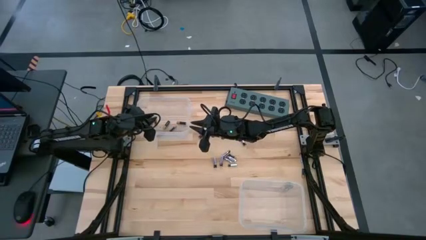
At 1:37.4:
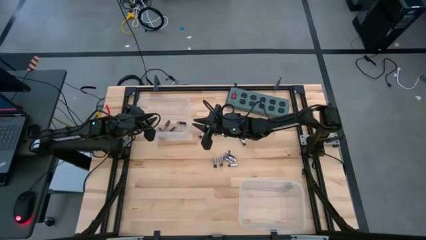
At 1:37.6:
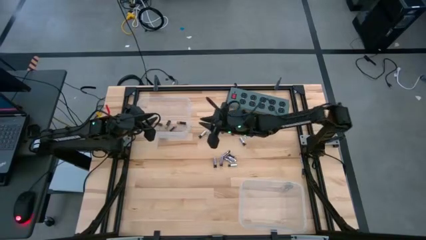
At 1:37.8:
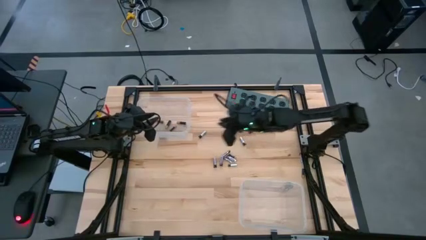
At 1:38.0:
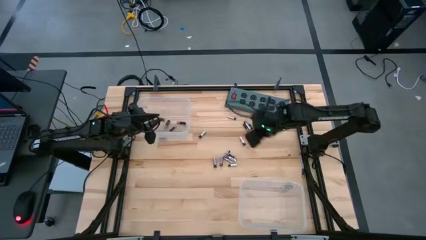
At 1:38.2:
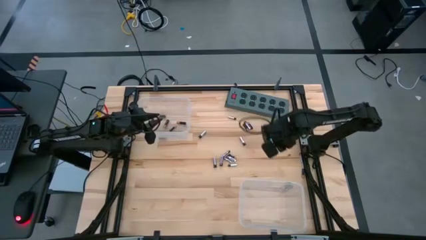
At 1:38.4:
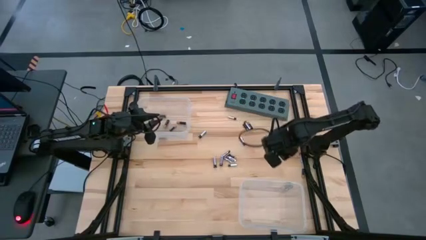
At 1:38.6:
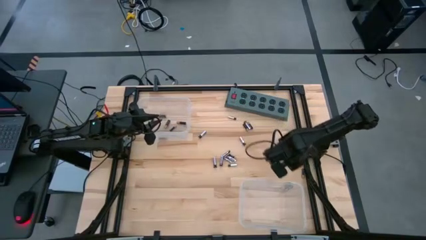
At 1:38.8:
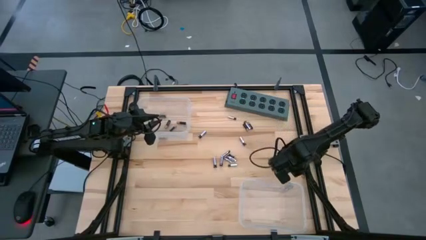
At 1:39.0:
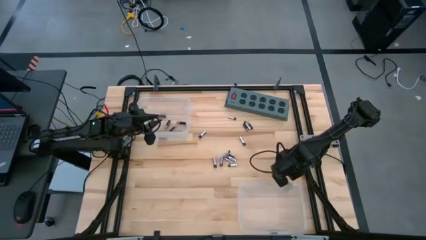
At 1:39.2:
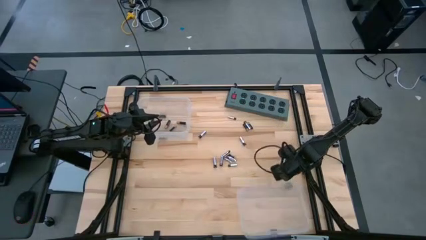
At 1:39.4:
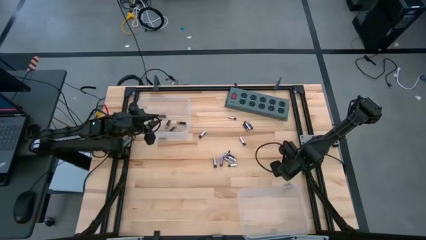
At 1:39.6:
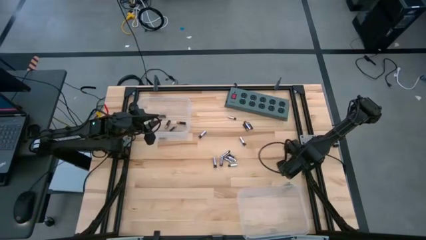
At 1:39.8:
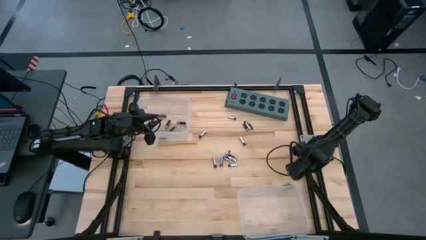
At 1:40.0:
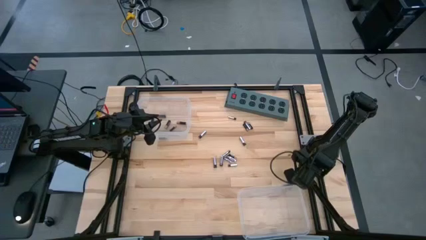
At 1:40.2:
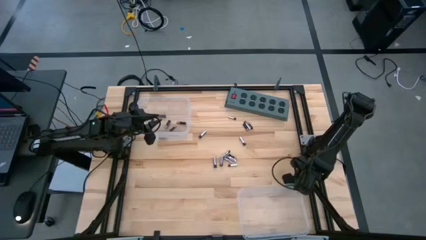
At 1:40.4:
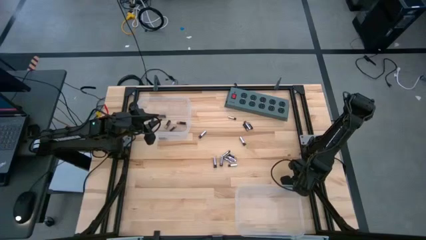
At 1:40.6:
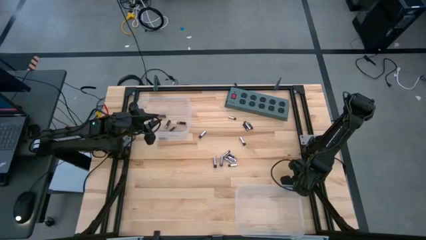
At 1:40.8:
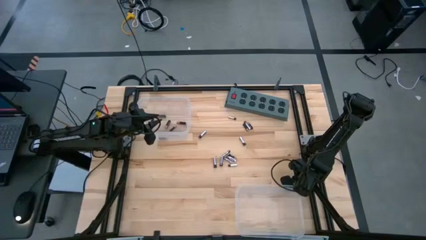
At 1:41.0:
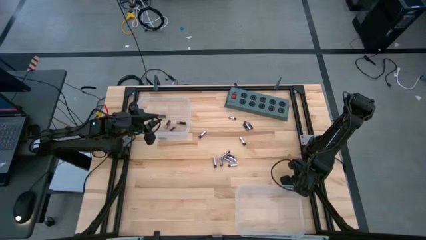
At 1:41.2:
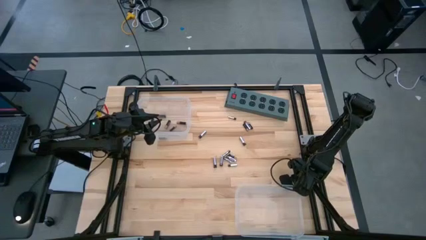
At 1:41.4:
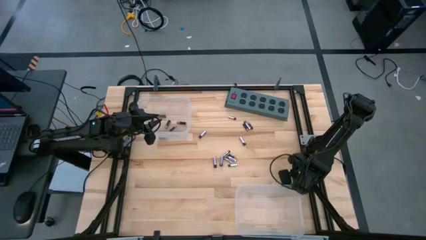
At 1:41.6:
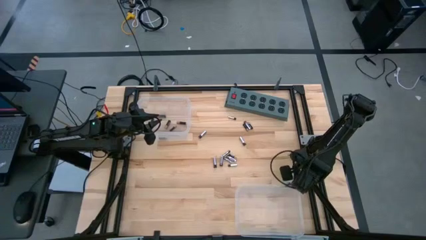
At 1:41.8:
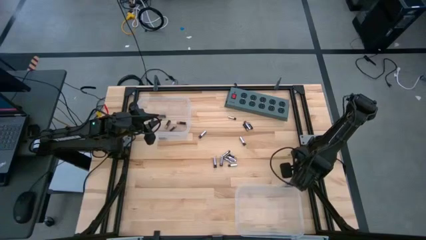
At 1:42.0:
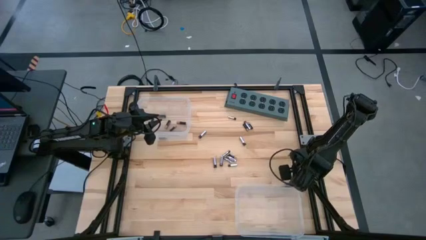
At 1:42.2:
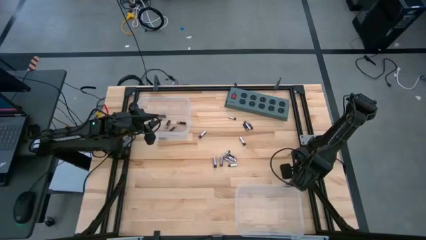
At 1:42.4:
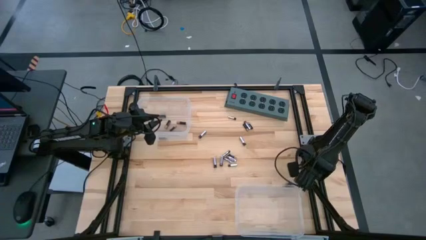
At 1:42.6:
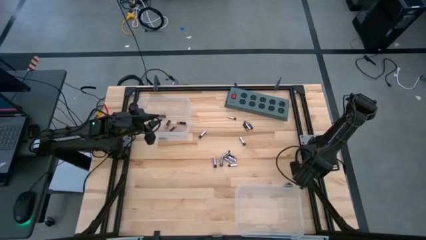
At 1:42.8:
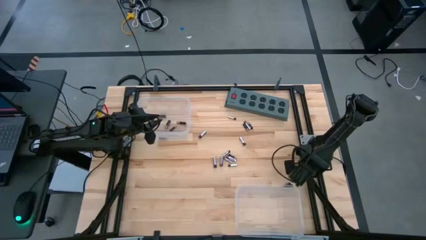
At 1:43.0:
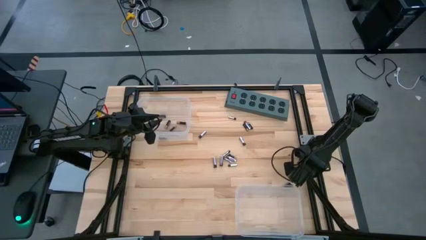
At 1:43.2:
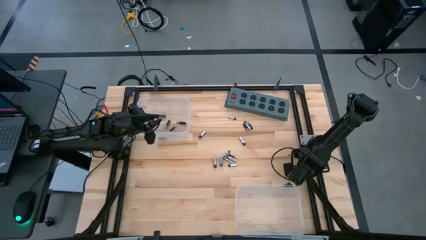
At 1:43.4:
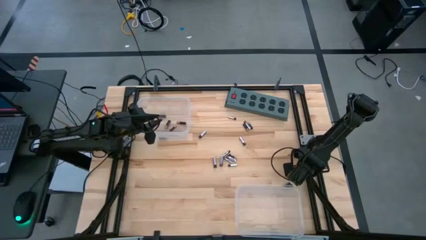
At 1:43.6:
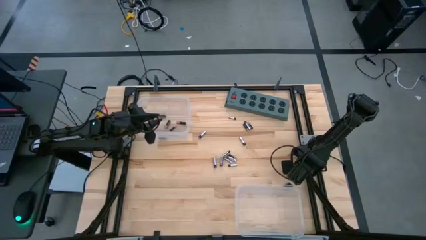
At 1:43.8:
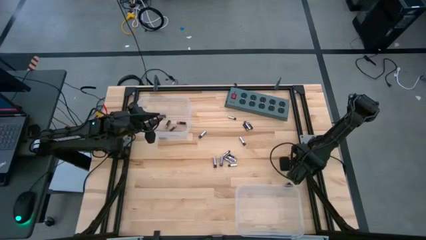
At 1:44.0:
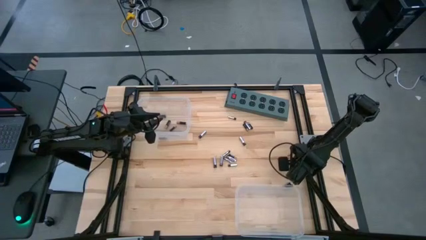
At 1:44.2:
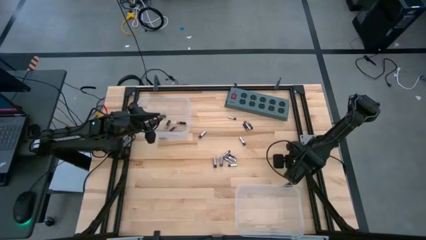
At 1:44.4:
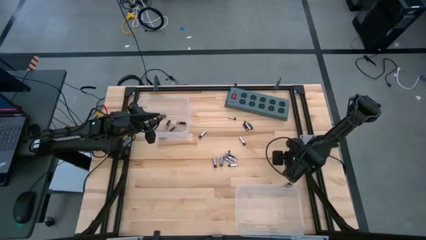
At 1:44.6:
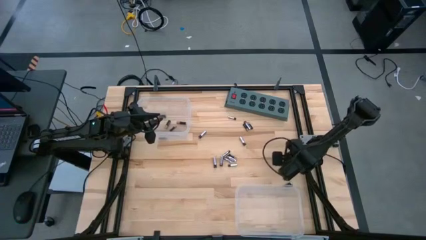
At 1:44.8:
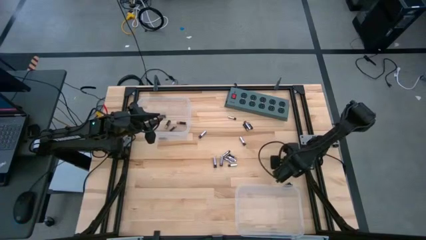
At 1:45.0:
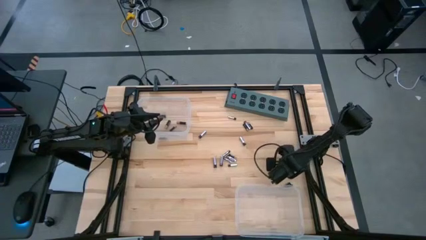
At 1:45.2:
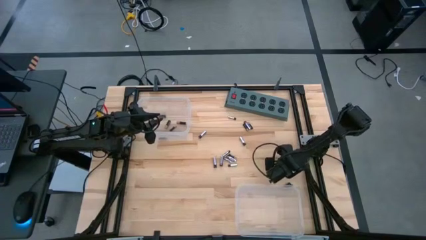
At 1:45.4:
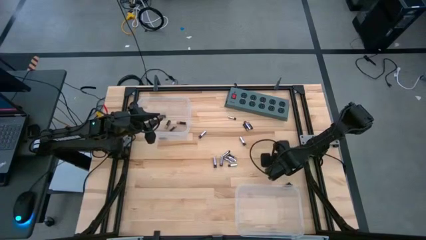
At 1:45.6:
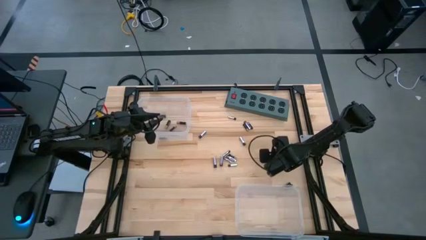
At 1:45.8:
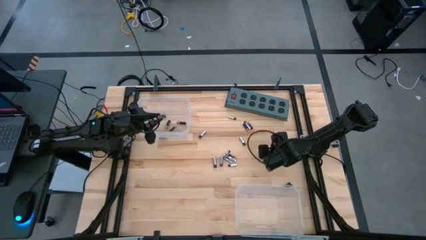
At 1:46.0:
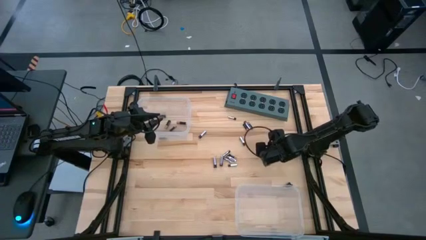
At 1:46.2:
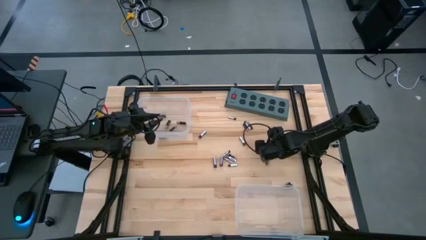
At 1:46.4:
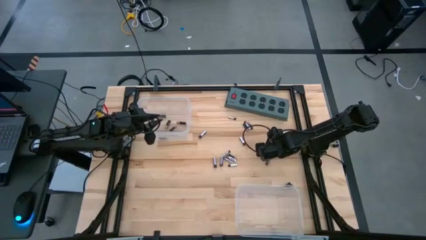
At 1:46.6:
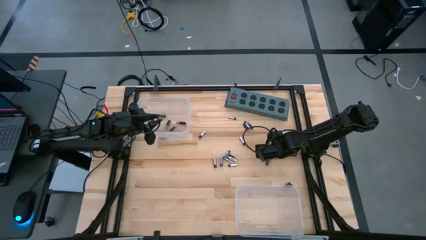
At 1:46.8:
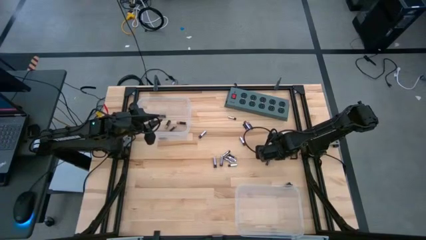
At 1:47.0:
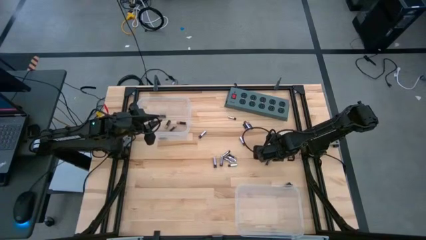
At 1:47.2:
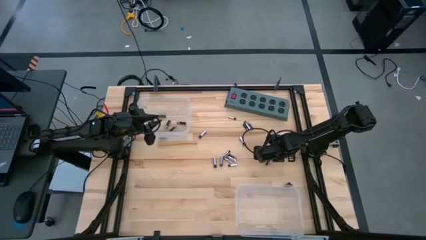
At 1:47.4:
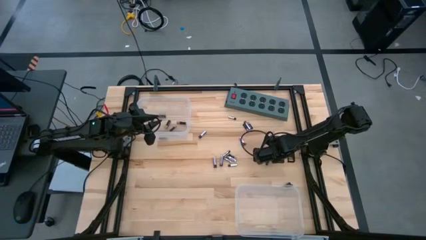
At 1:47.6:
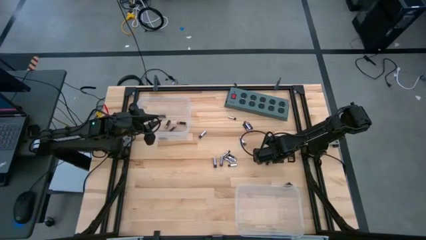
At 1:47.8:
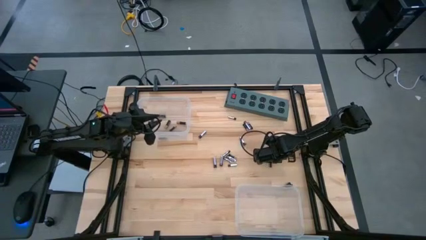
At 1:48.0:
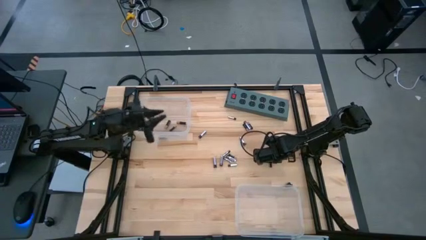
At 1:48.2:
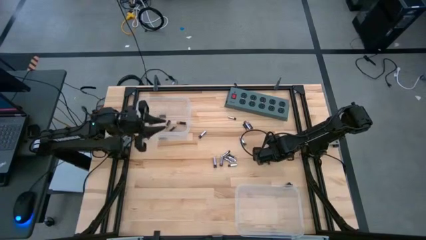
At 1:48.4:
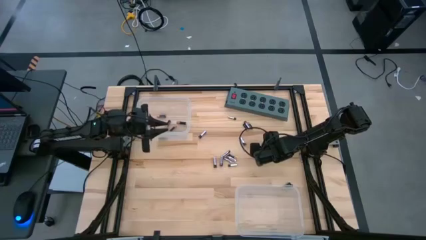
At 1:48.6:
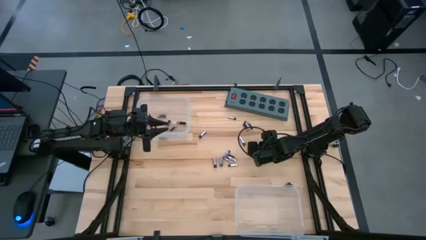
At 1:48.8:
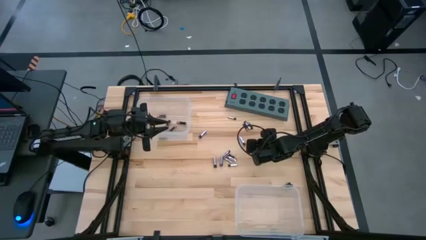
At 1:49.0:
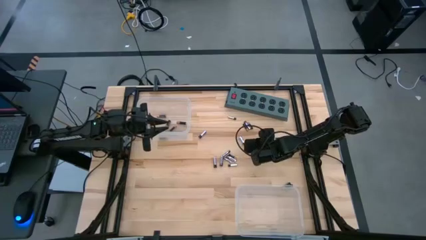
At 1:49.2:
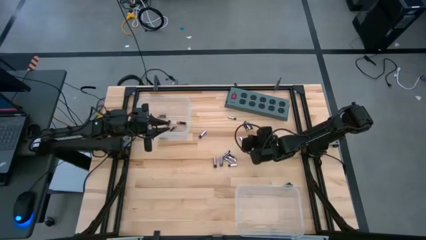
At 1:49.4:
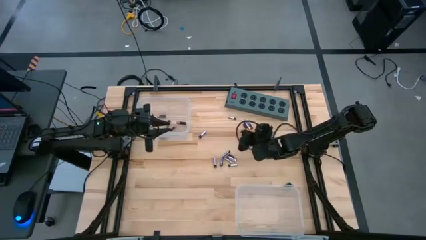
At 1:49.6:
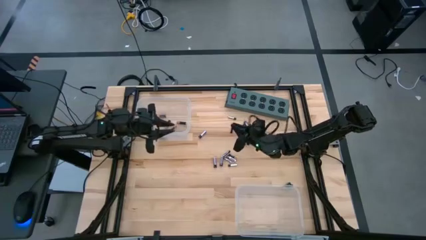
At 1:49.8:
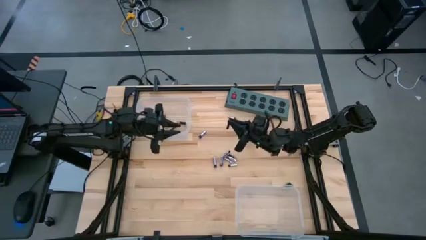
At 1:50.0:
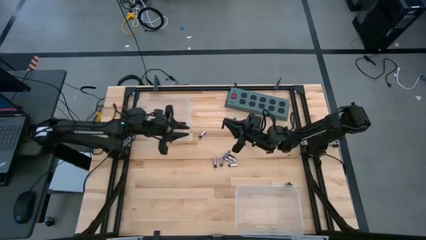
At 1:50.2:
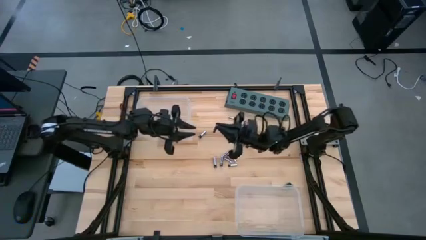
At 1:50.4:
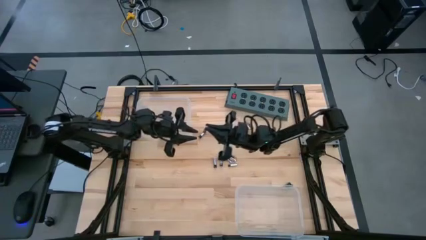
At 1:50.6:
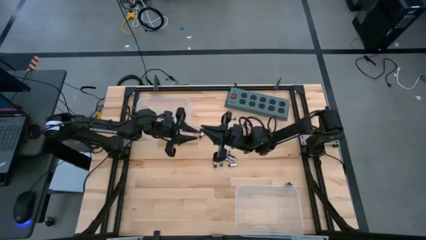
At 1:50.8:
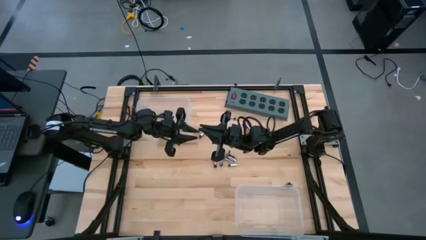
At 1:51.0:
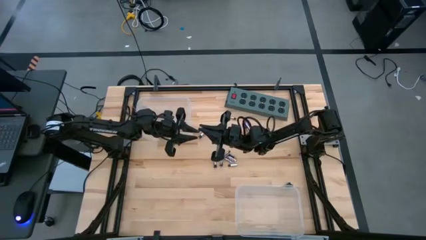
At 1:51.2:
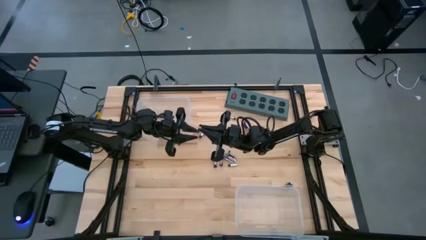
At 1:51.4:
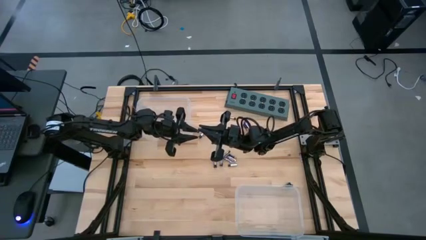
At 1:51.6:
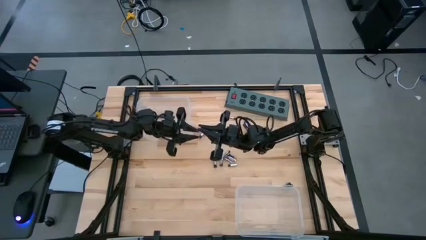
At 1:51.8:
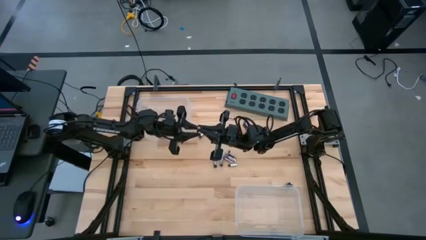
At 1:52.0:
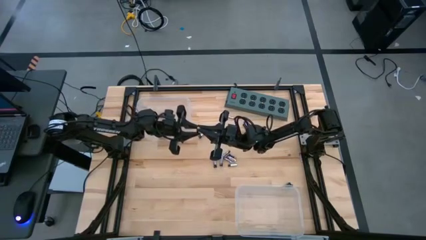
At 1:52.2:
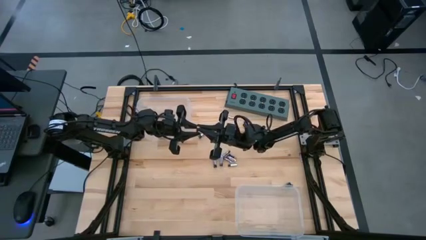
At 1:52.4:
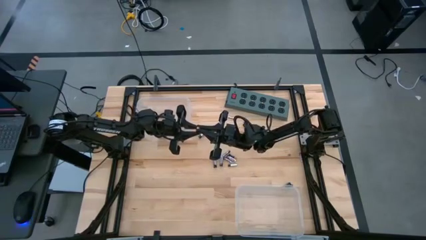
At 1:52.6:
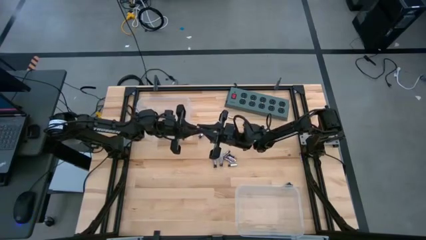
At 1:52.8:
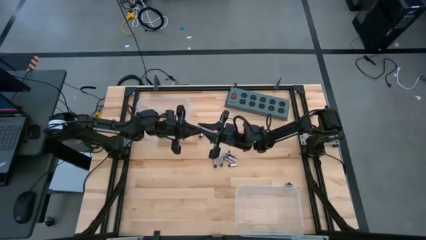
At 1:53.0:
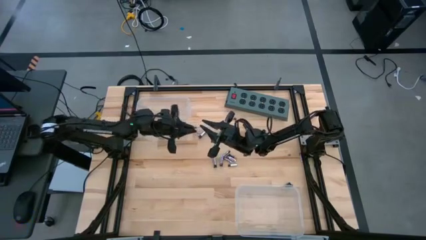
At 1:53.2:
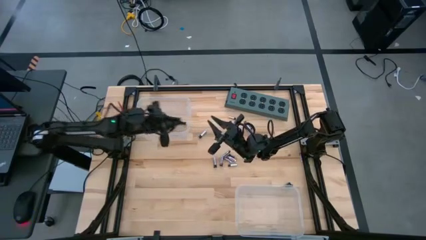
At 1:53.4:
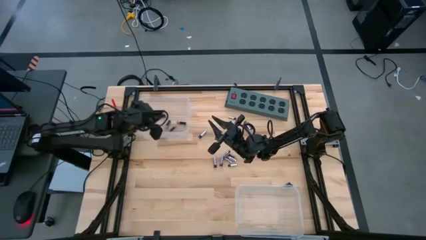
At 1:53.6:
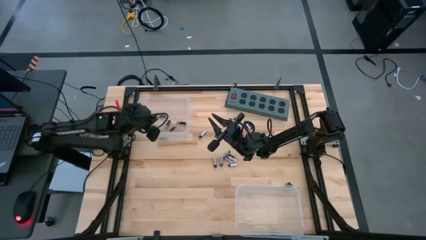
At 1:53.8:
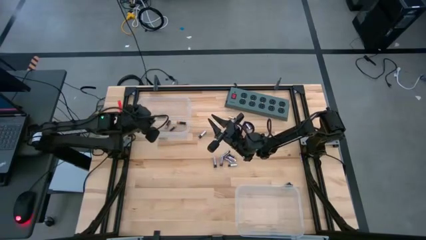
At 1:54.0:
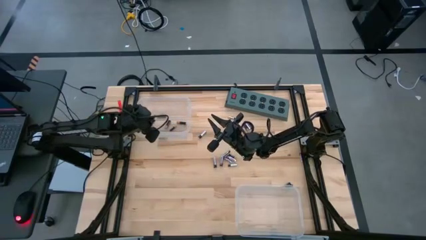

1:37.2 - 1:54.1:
Task: Sort batteries
Put the black battery into the top transparent bin
